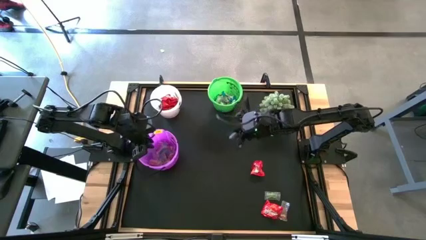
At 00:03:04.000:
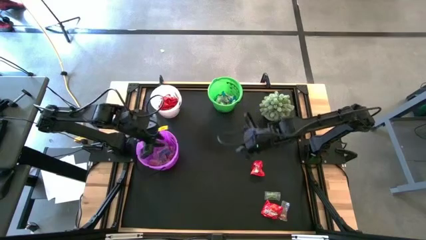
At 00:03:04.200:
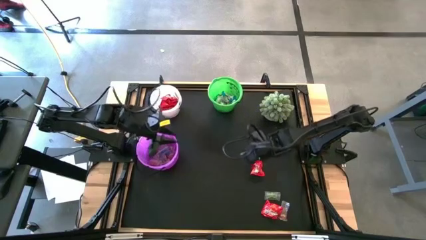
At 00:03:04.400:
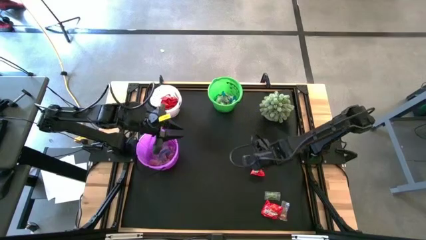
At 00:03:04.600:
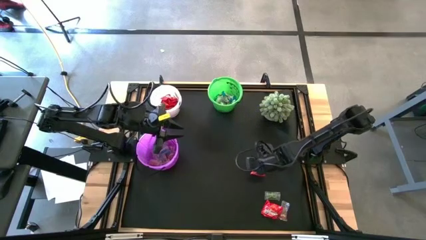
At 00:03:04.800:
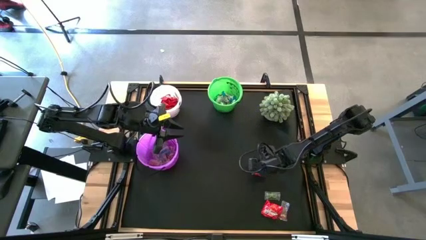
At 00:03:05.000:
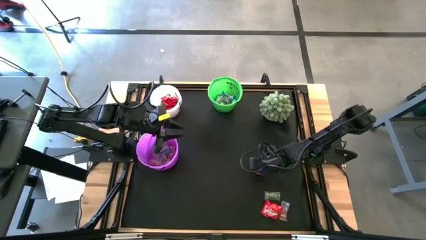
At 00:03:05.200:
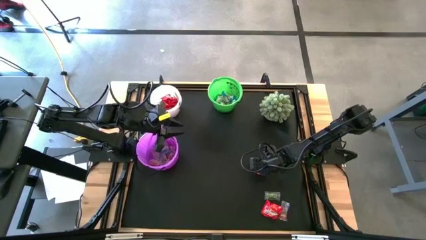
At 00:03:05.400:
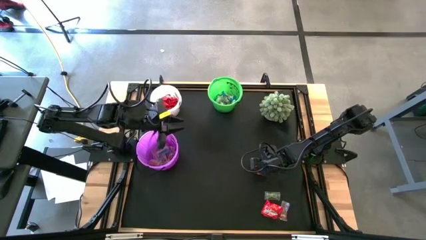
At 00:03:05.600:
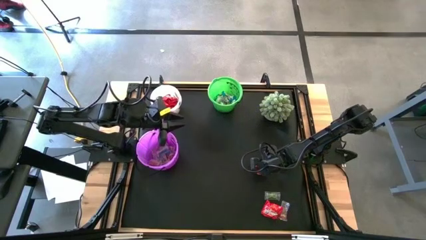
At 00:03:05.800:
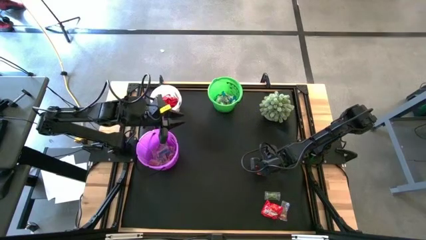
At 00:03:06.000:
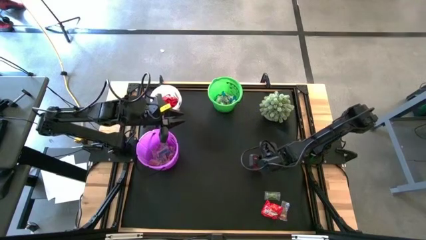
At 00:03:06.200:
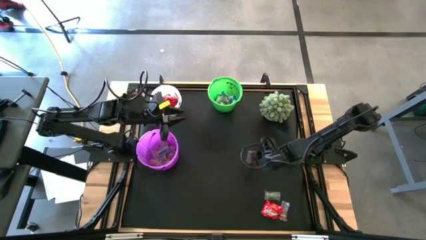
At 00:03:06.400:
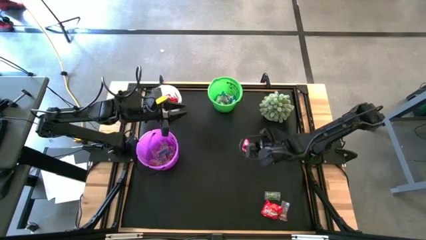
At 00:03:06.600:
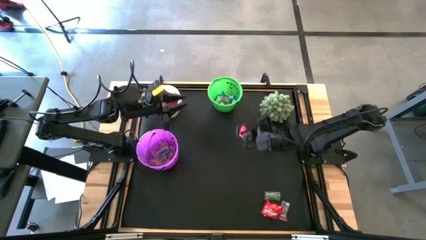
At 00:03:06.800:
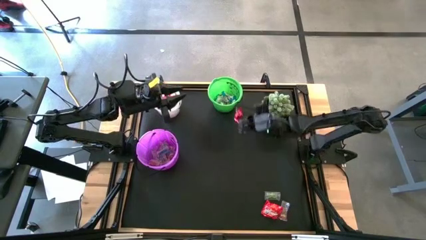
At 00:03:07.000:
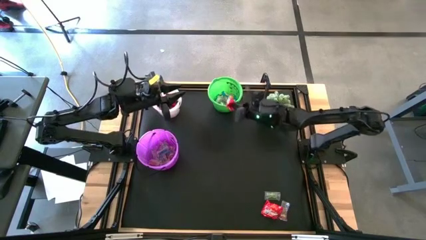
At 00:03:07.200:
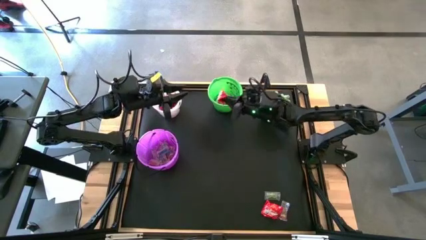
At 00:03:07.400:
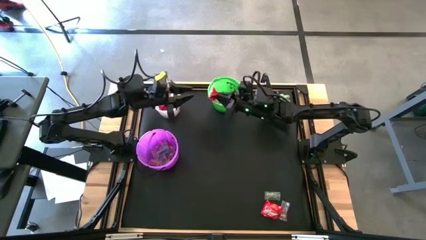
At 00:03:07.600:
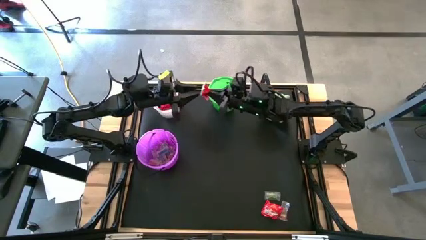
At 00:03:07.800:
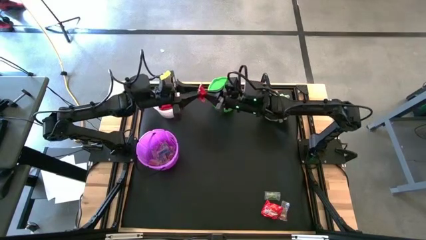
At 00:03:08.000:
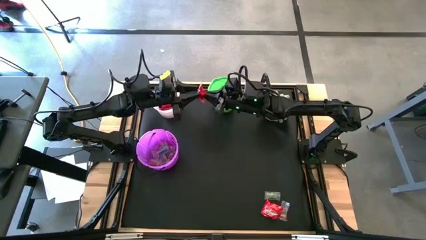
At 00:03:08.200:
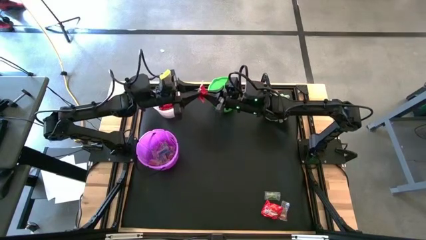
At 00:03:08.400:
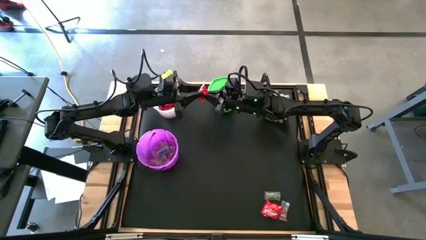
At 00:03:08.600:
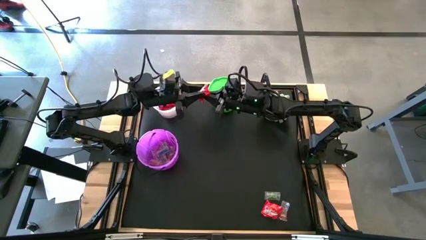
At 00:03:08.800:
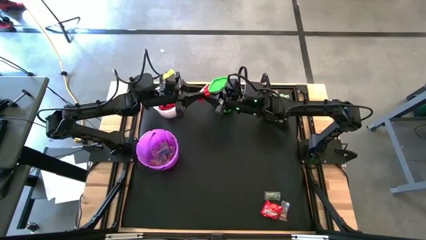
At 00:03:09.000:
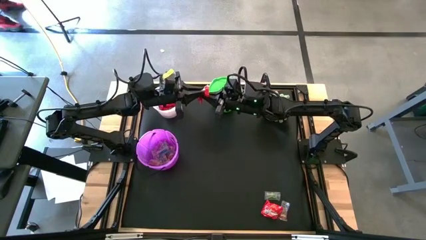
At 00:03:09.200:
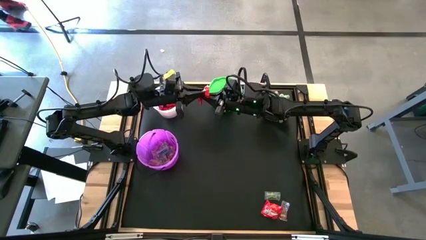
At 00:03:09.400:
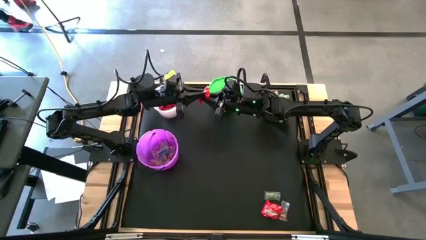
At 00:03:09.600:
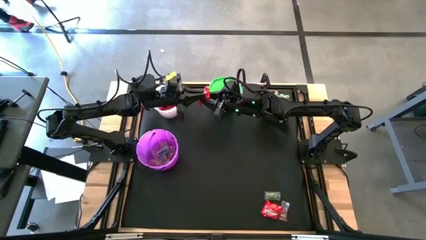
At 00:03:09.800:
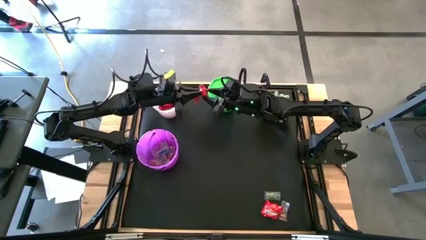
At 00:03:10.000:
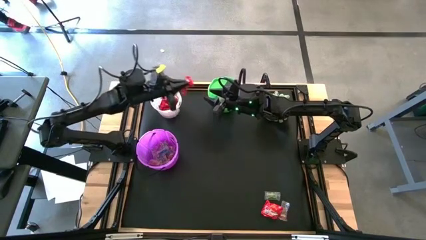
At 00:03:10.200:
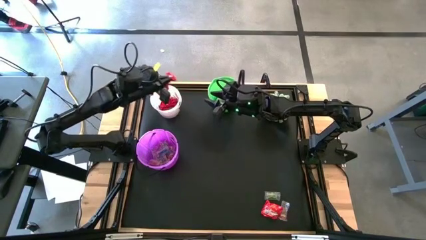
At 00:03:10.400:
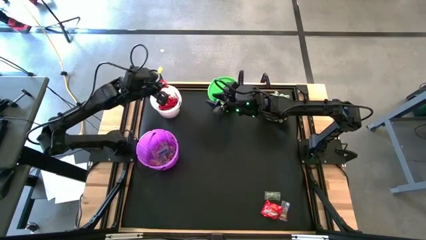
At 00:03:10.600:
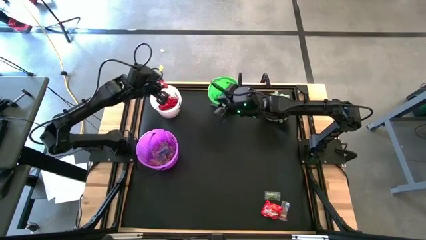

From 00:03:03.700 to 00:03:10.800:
Task: Sort candy
Put the red candy into the white bucket

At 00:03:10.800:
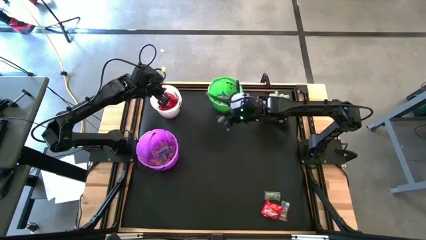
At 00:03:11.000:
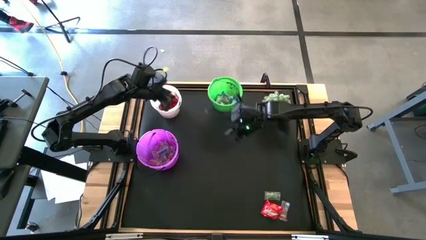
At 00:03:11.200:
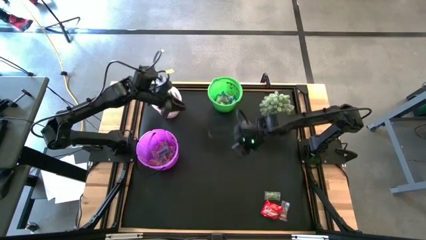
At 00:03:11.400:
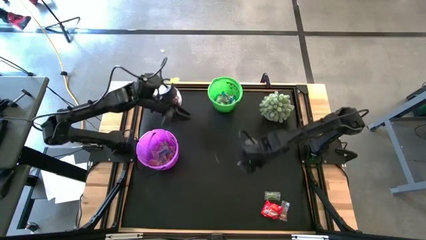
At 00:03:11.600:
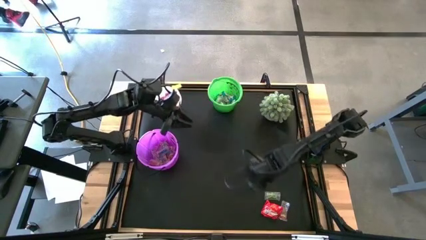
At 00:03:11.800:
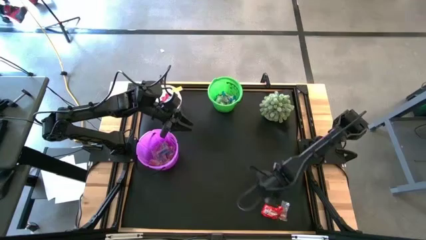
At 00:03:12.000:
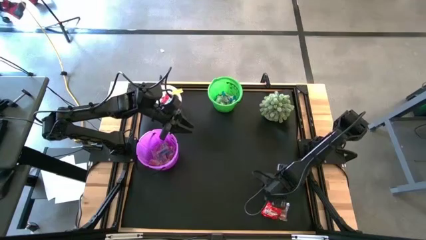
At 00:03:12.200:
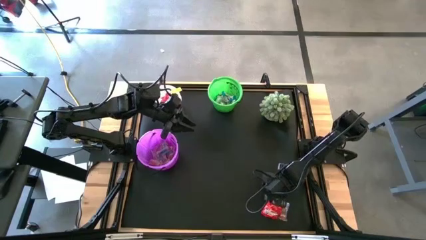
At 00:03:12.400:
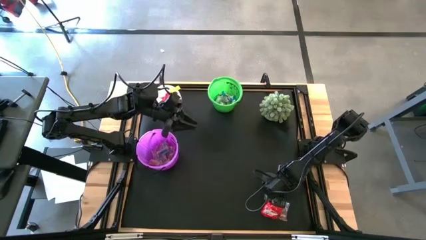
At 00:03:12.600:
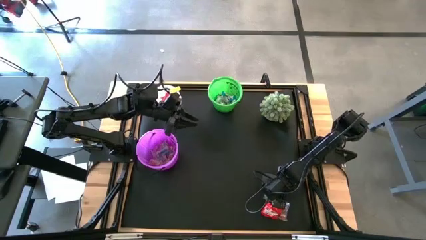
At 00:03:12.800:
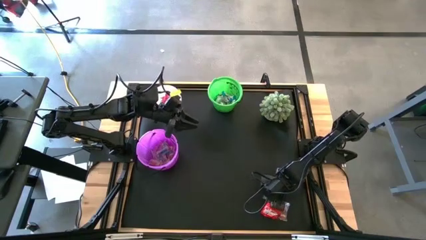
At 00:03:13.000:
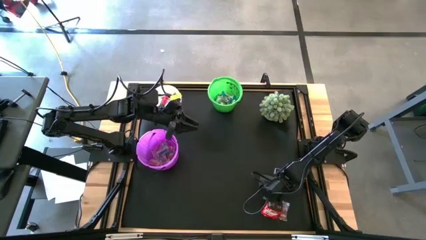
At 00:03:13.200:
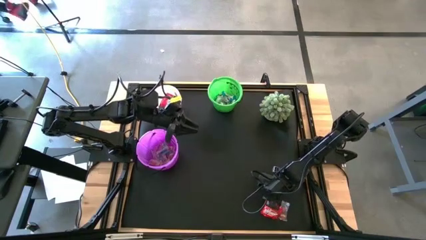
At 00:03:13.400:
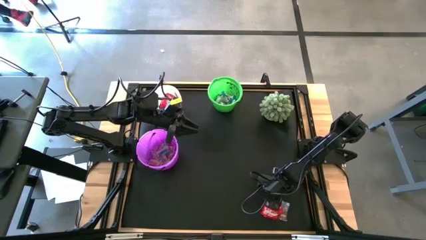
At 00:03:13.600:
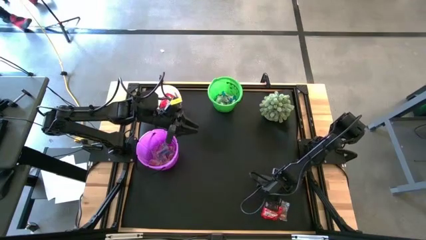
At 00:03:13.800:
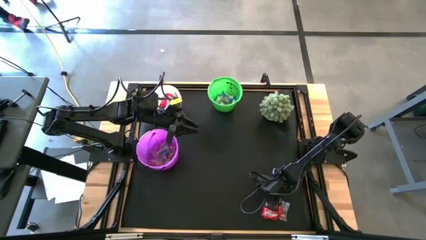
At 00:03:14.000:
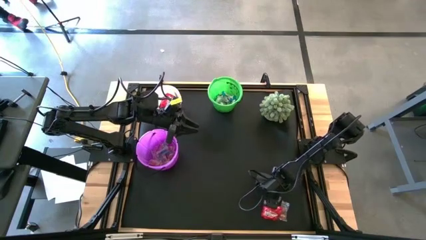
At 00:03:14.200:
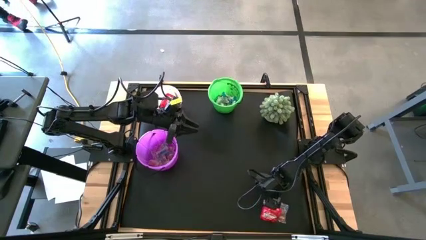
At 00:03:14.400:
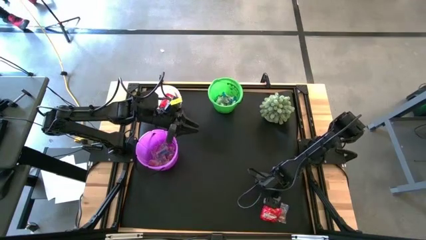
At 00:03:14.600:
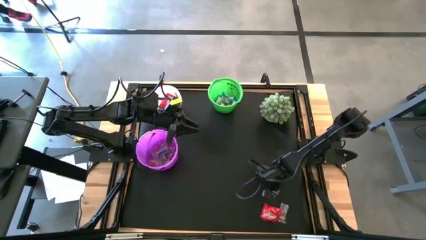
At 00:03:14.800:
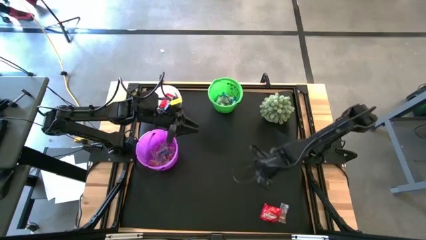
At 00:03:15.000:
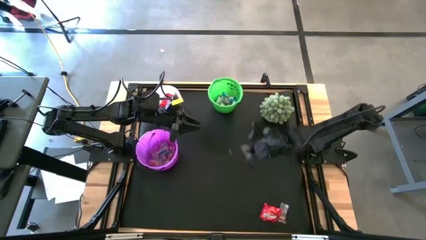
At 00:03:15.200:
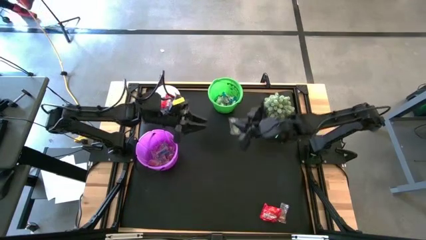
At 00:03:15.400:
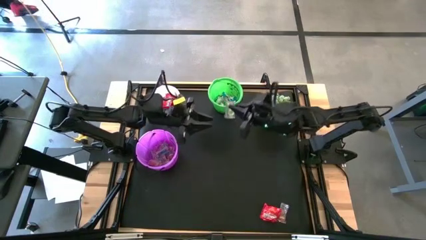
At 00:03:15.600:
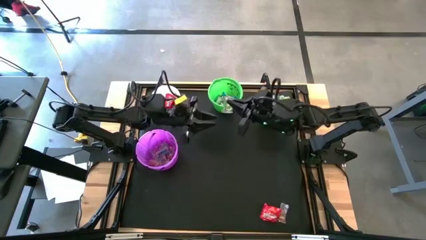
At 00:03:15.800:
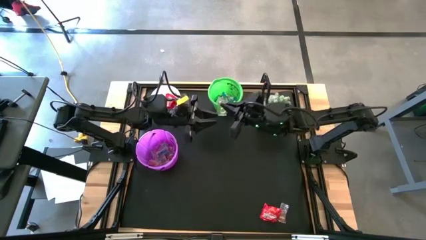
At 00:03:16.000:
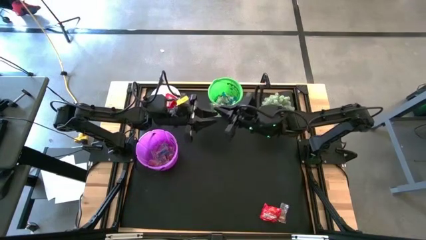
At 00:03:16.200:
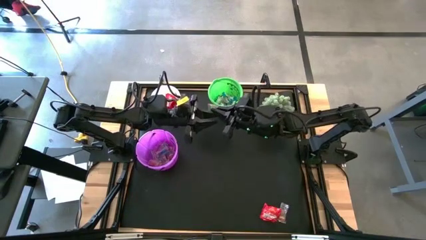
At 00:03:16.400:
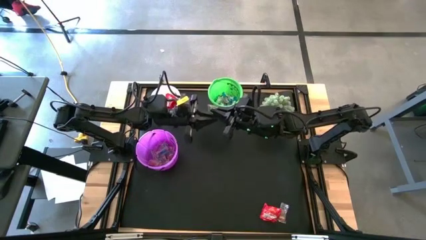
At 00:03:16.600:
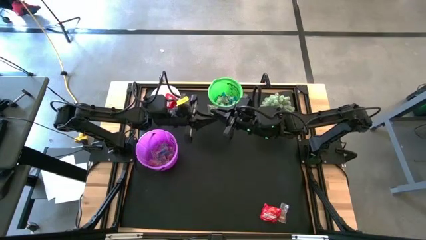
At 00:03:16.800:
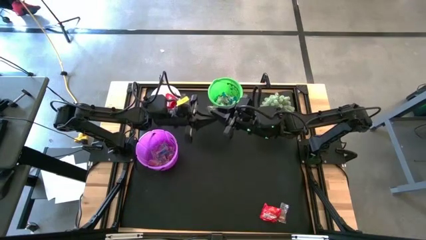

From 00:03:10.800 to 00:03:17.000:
Put the green gummy into the violet bucket
